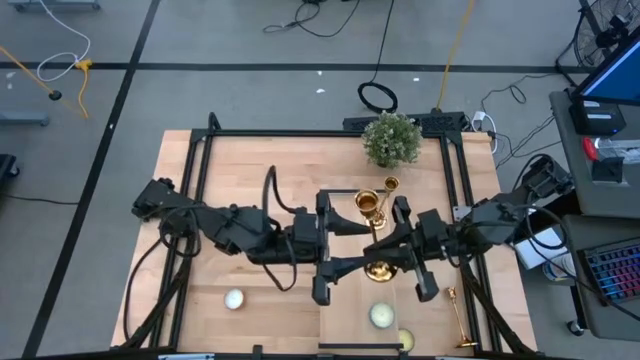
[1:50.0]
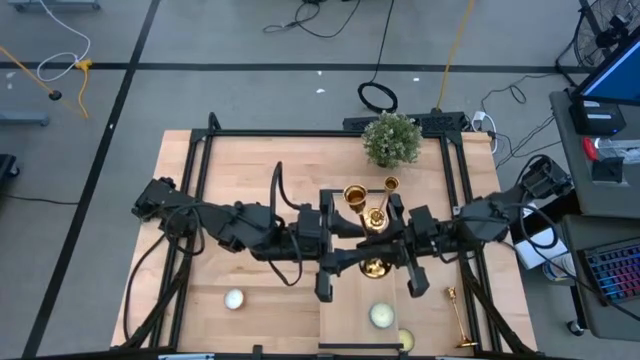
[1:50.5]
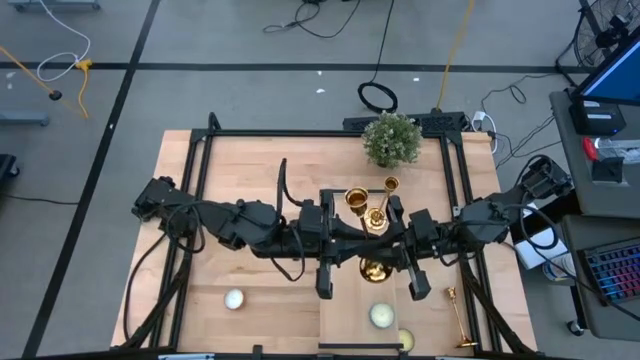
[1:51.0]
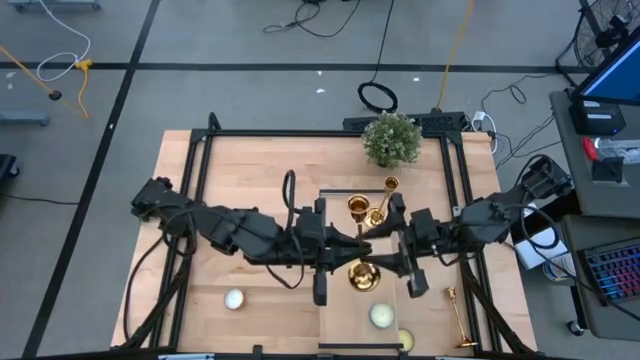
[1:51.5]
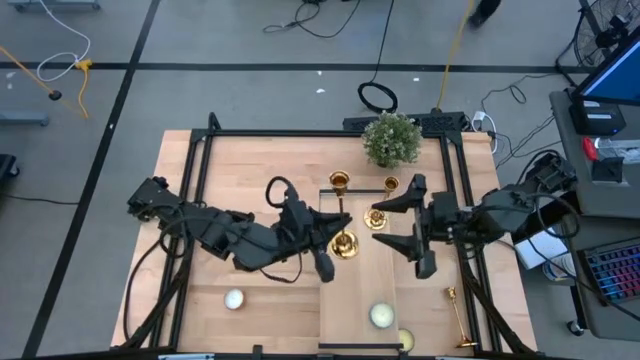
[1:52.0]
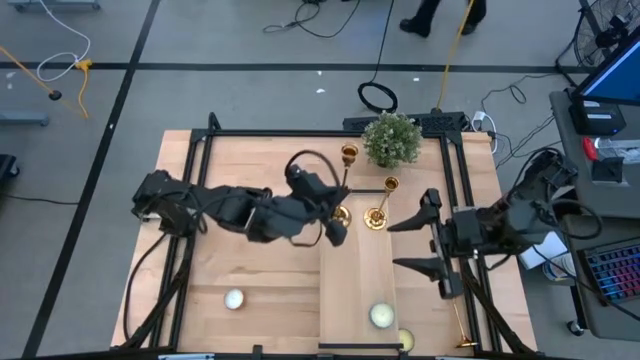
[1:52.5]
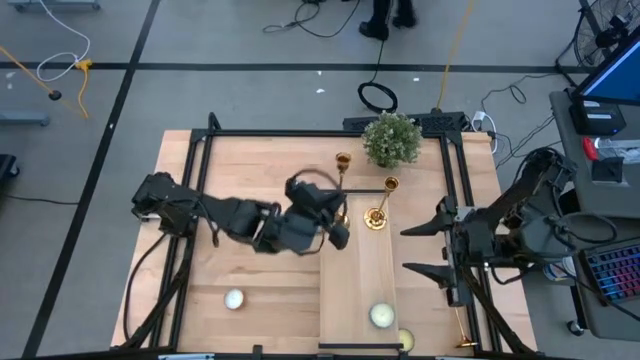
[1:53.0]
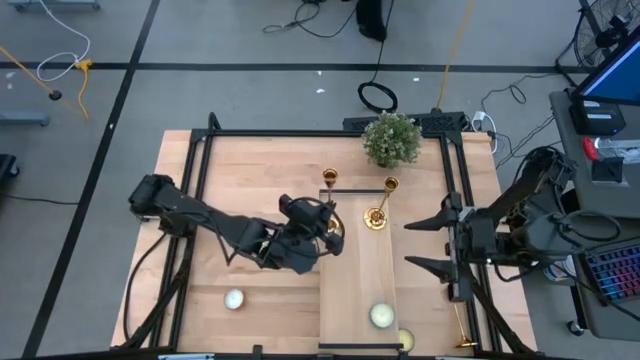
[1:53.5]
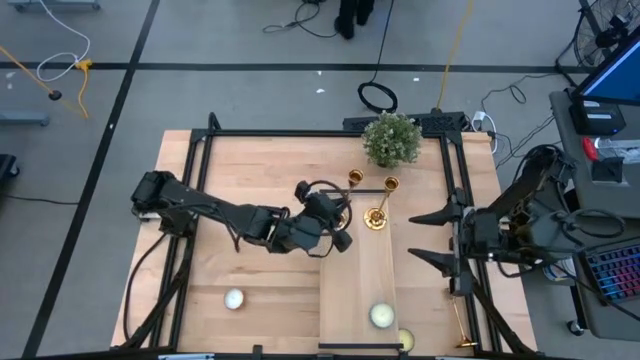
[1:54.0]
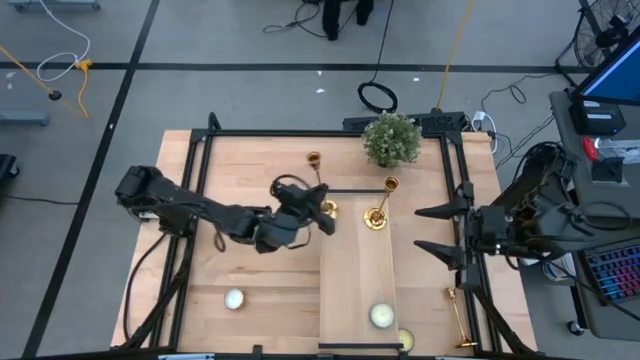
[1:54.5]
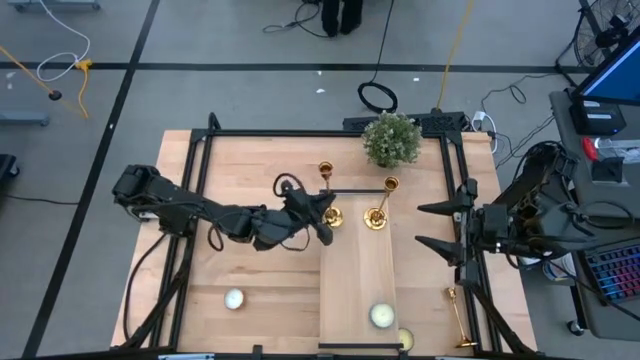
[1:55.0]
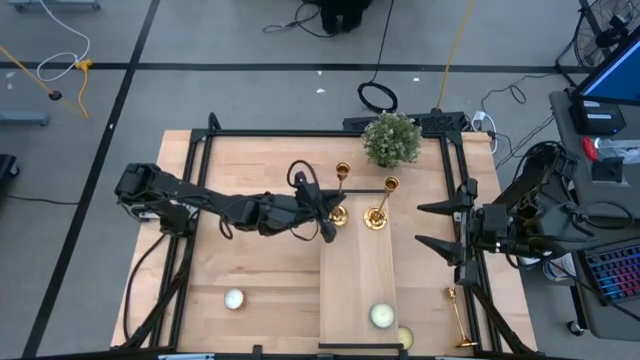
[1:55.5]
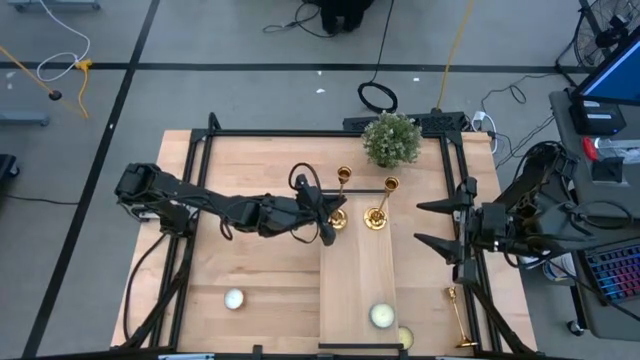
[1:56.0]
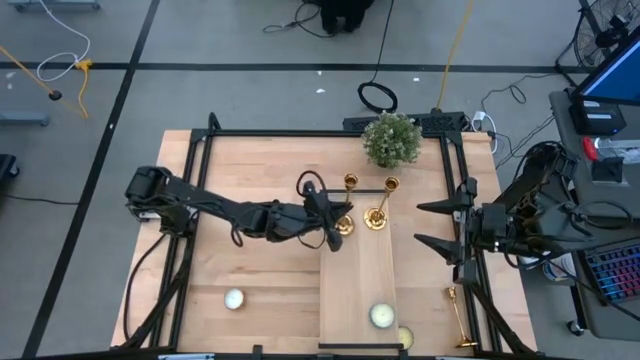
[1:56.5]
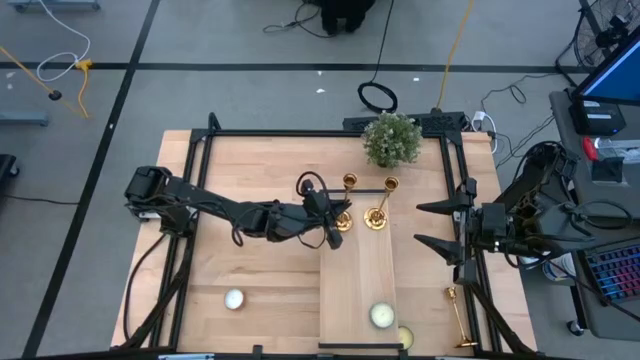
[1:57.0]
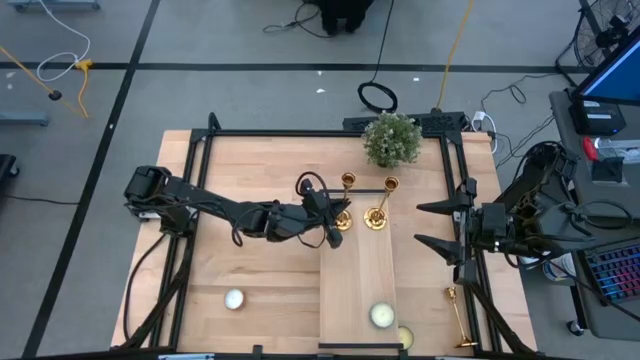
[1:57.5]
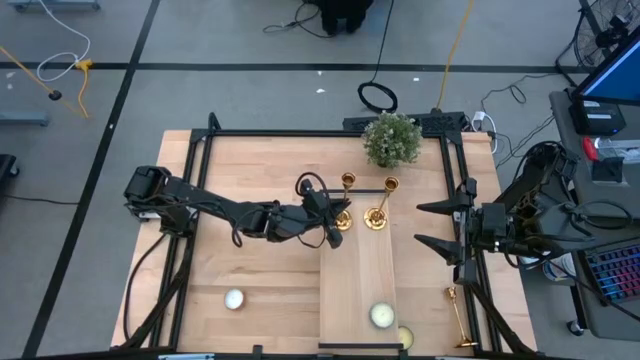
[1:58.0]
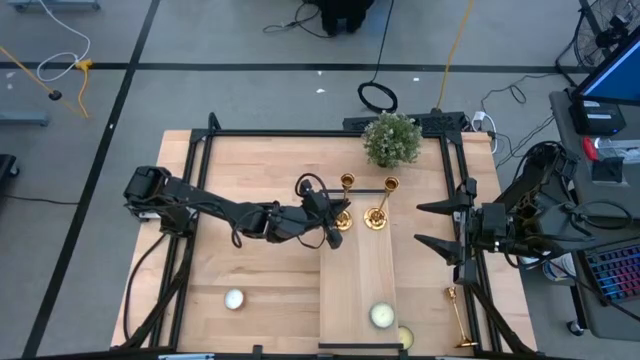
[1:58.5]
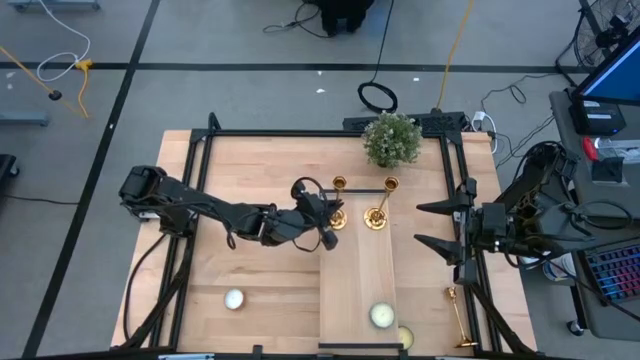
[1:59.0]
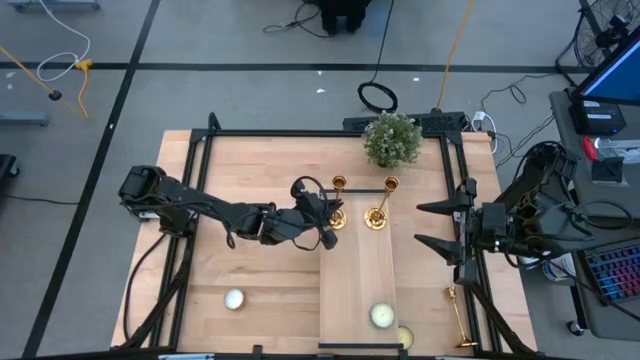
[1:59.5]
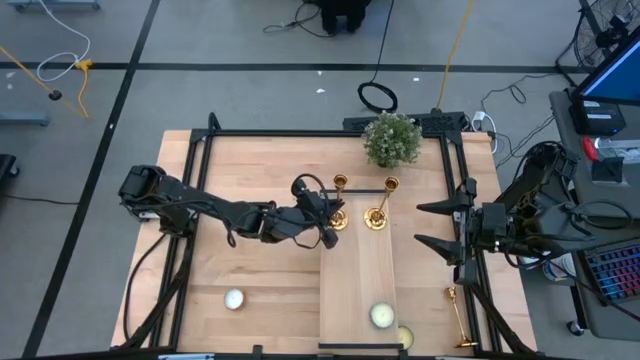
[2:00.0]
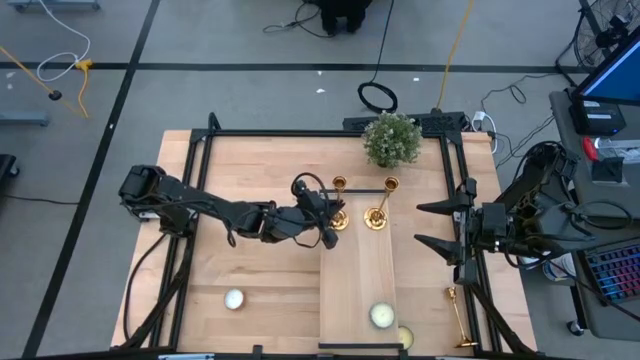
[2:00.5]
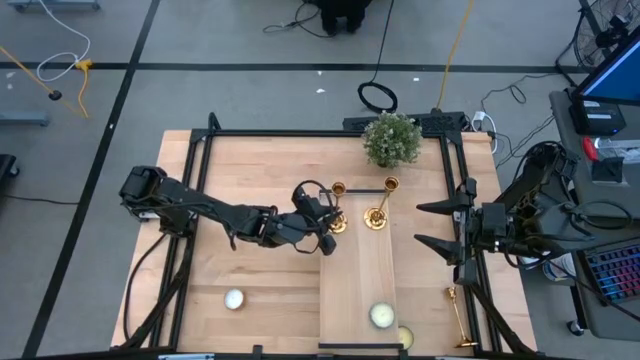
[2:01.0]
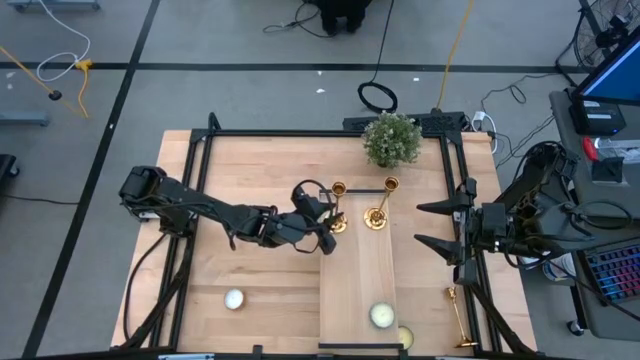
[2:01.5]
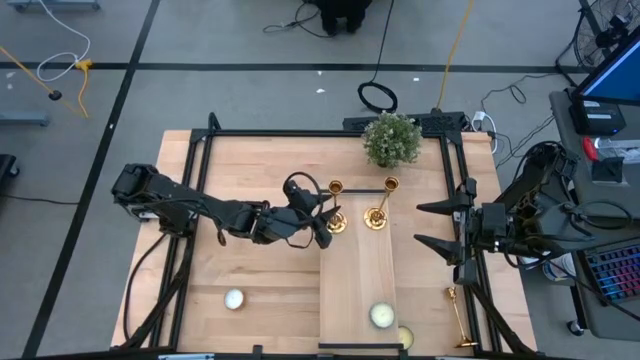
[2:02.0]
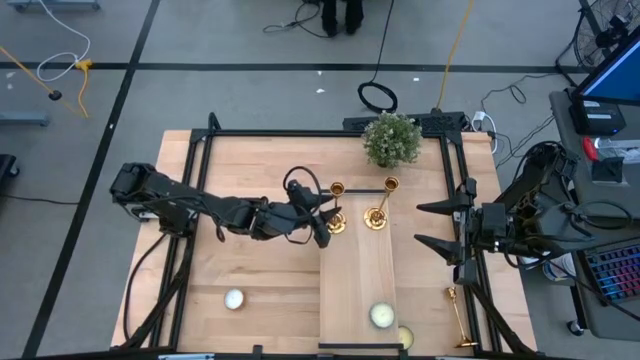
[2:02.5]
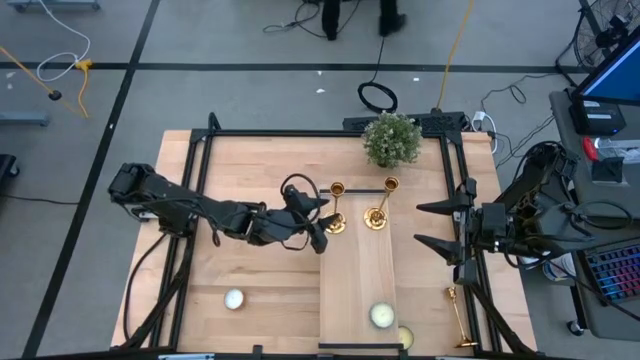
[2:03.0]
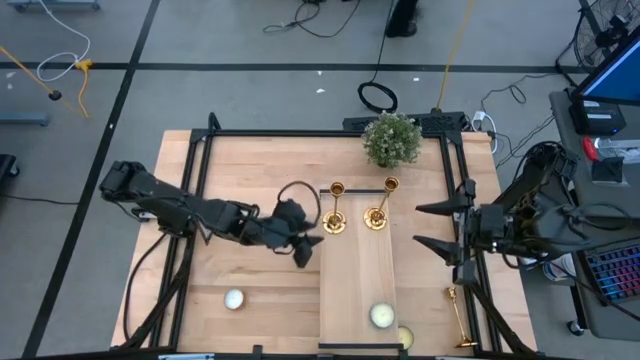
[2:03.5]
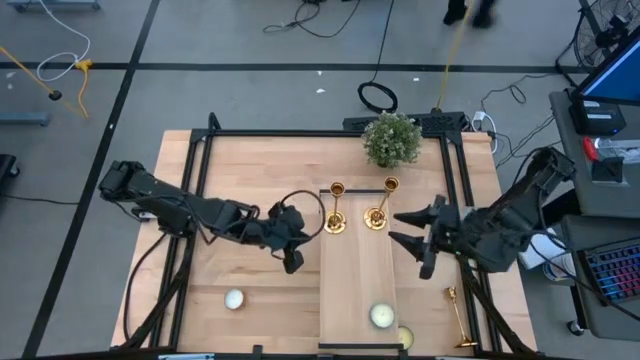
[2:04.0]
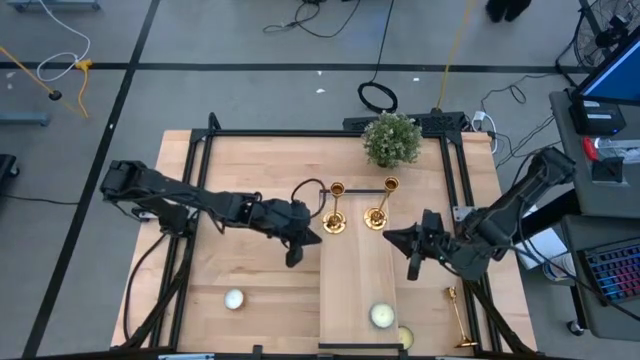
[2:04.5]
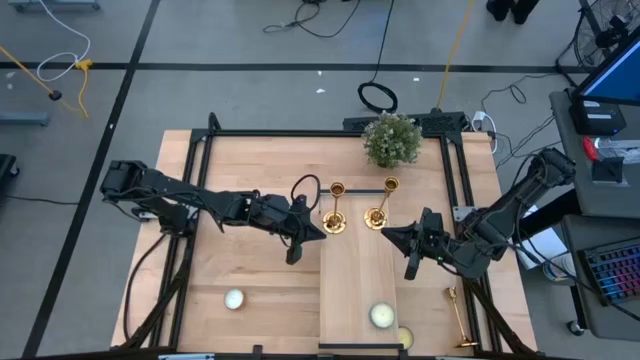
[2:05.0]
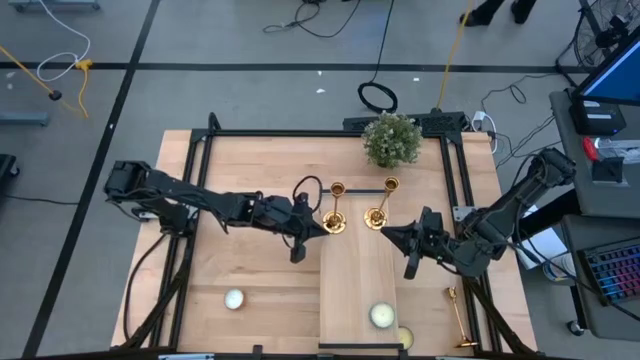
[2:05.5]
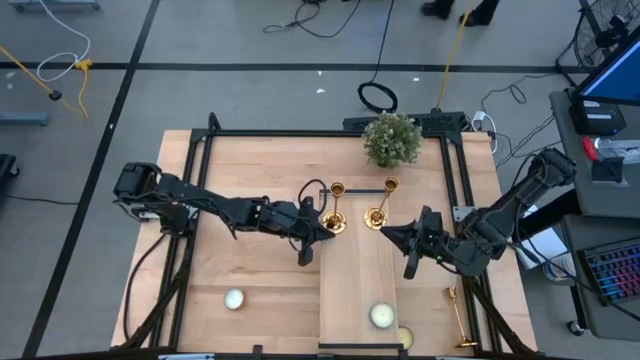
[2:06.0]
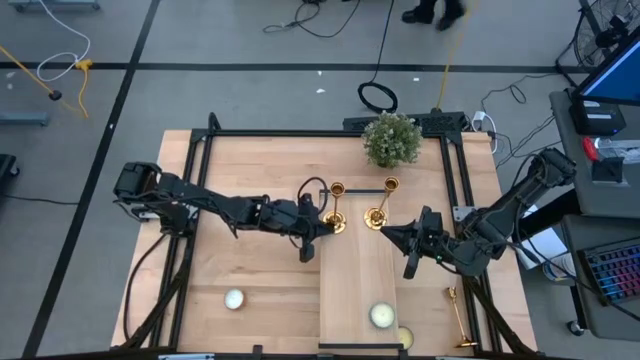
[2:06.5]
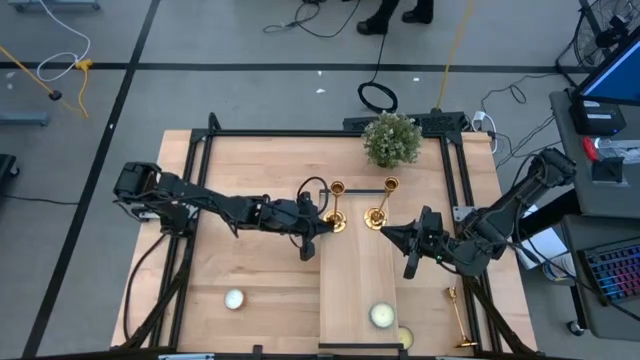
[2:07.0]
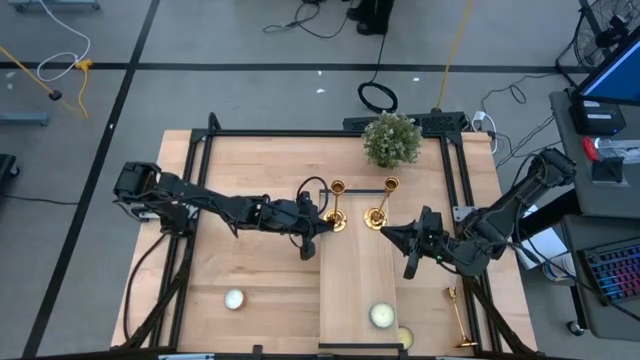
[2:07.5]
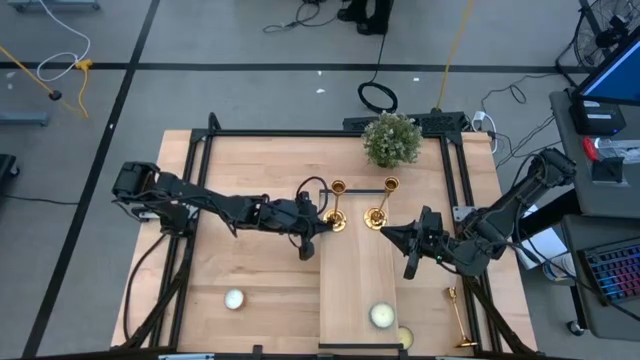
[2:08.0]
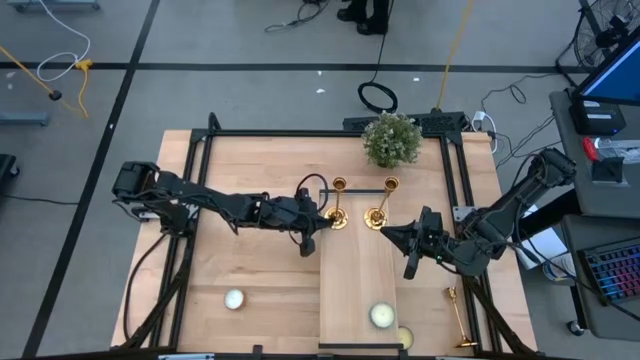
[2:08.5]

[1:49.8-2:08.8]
Task: Pick & Place candle stick holders
Put the top gold candle holder on the shelf

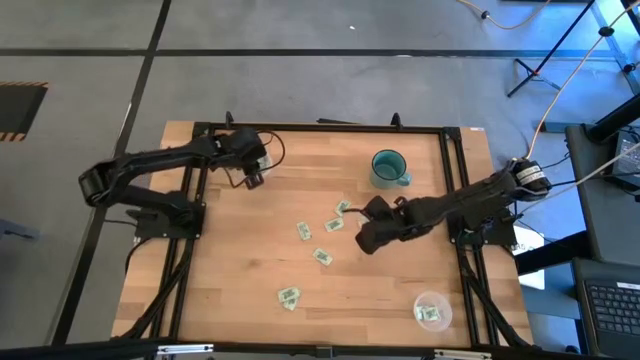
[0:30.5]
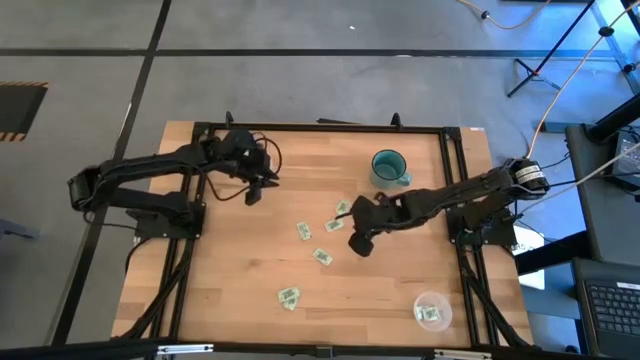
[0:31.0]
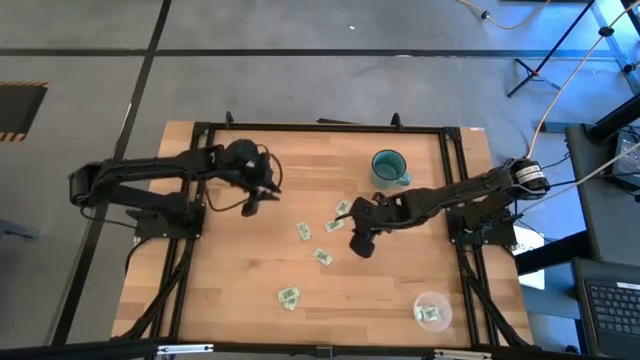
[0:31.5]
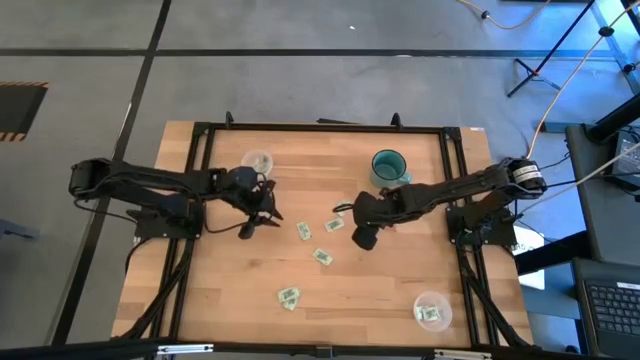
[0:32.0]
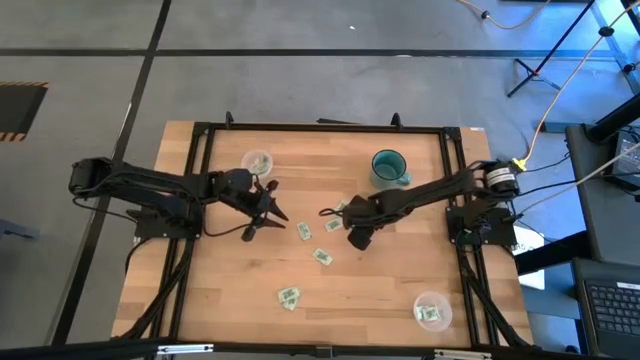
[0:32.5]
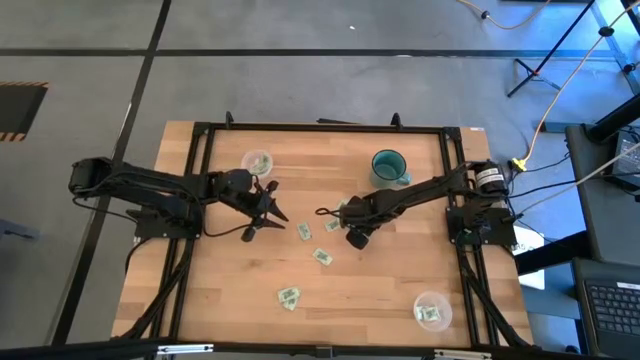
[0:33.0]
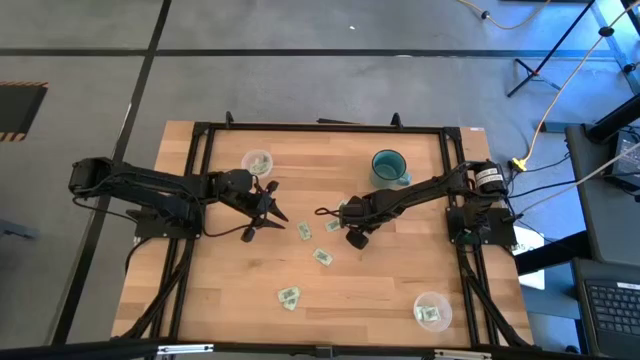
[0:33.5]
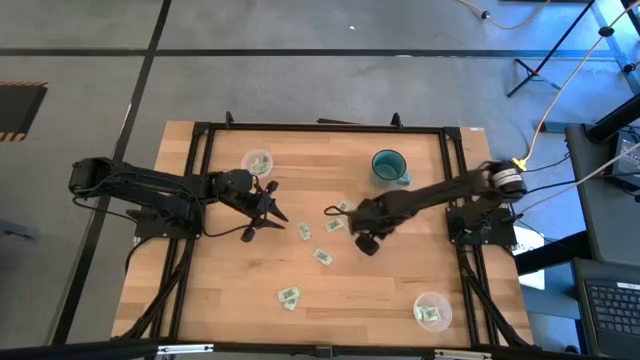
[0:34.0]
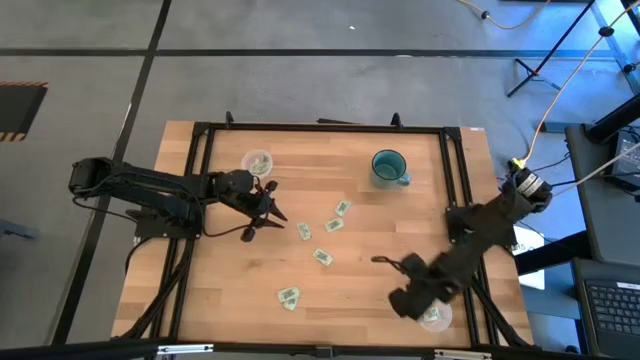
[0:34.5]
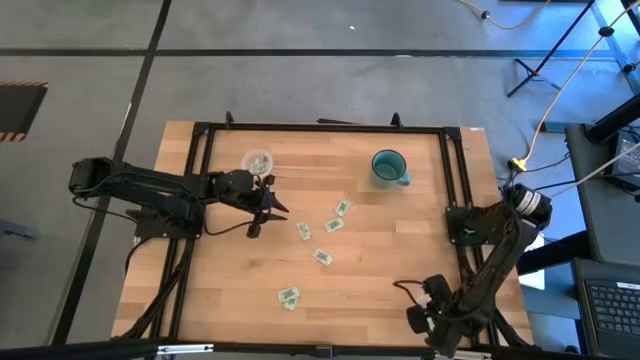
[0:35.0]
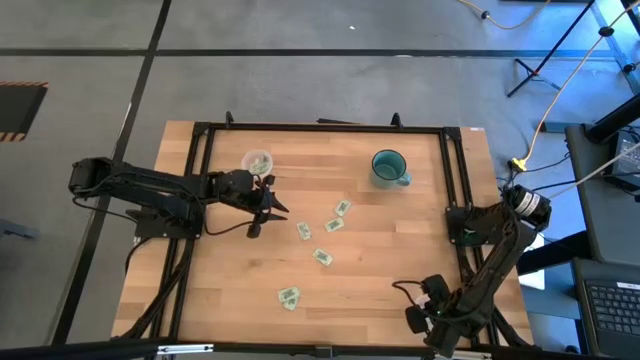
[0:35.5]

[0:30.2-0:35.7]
Task: Pick and place Stevia / Truvia into bins
Put the stevia packet into the bottom transparent container
